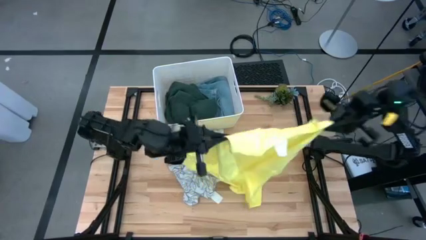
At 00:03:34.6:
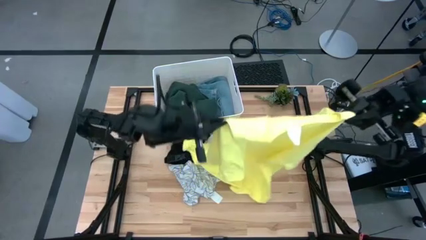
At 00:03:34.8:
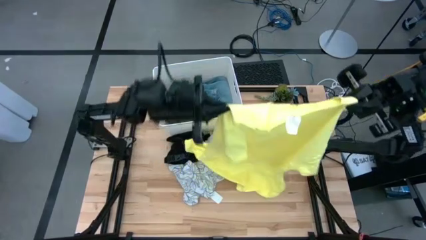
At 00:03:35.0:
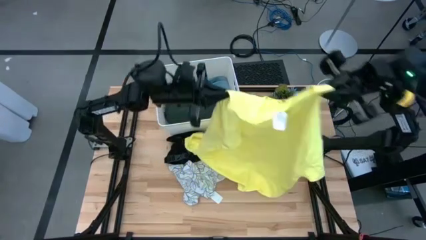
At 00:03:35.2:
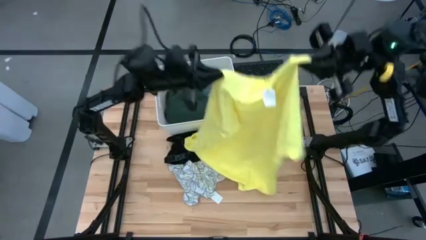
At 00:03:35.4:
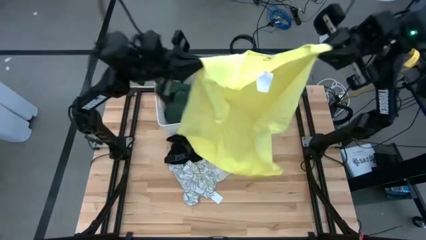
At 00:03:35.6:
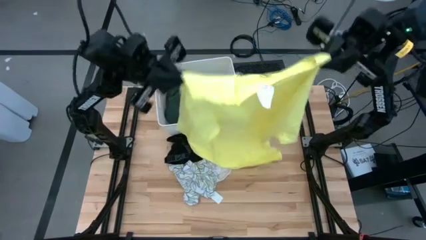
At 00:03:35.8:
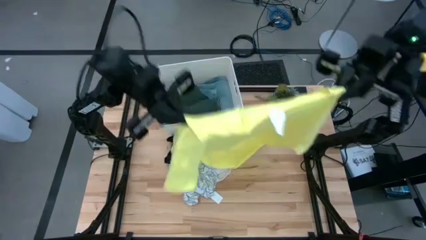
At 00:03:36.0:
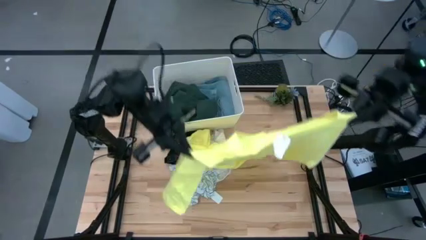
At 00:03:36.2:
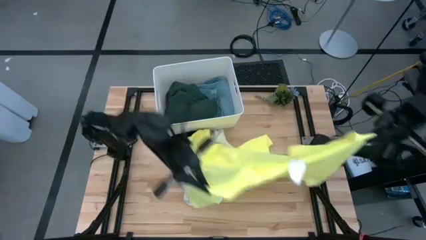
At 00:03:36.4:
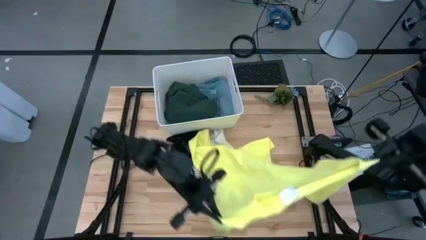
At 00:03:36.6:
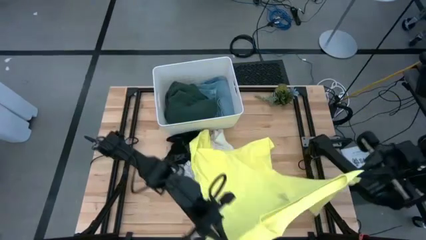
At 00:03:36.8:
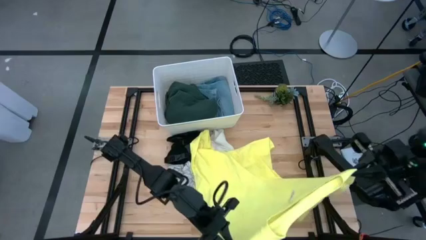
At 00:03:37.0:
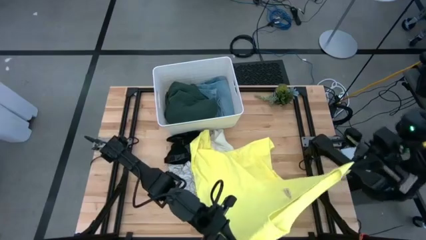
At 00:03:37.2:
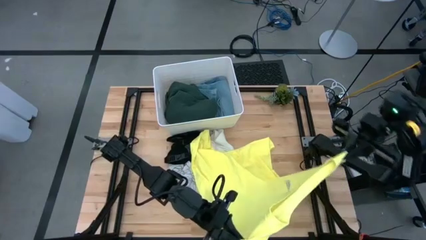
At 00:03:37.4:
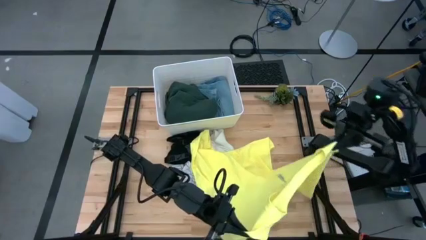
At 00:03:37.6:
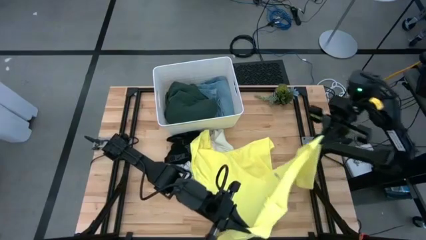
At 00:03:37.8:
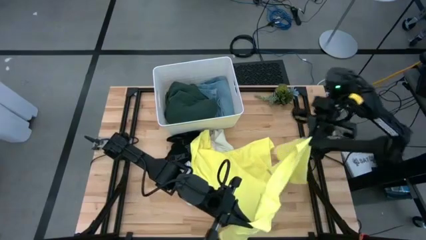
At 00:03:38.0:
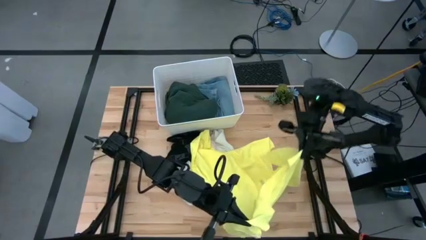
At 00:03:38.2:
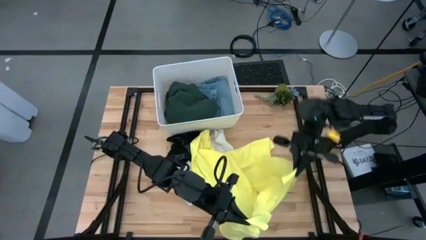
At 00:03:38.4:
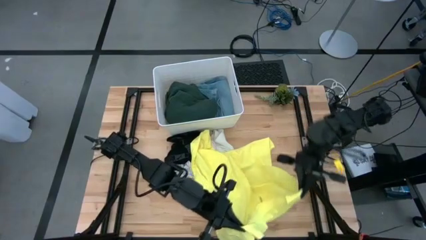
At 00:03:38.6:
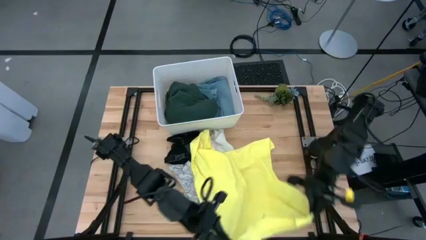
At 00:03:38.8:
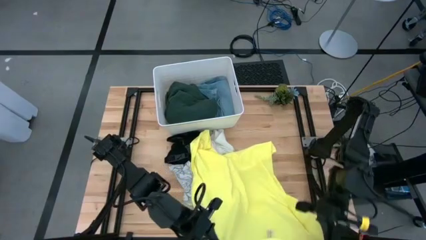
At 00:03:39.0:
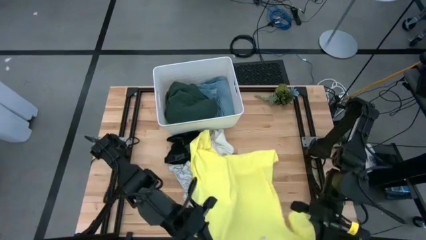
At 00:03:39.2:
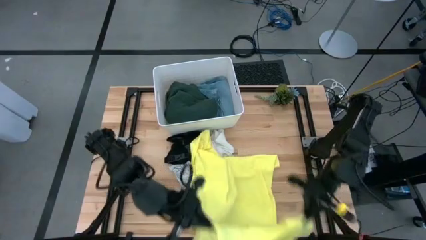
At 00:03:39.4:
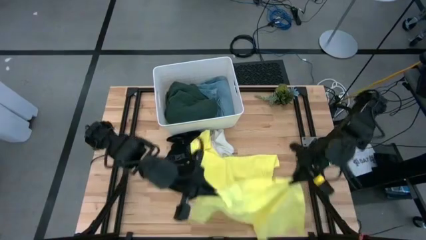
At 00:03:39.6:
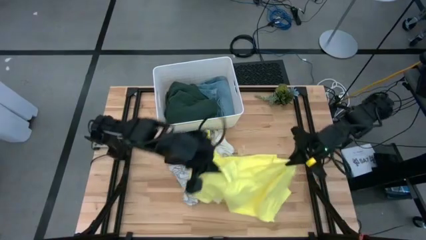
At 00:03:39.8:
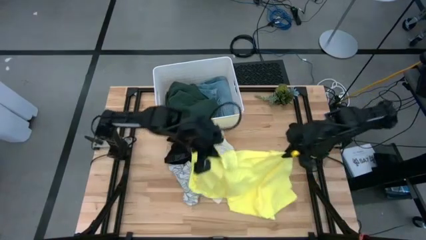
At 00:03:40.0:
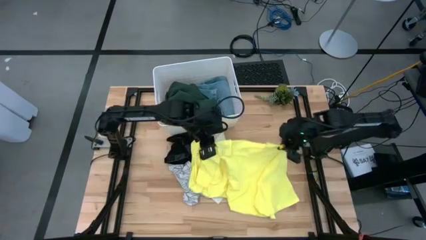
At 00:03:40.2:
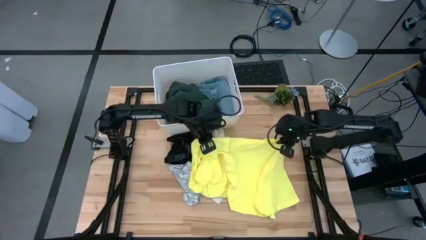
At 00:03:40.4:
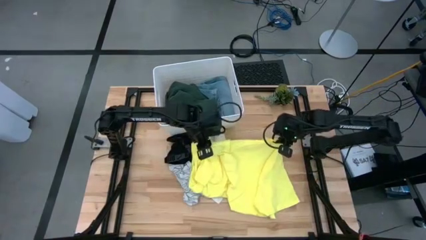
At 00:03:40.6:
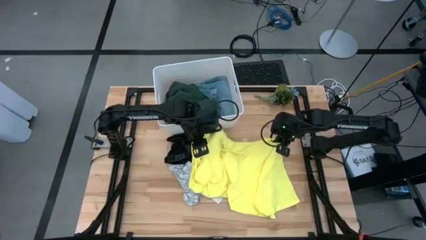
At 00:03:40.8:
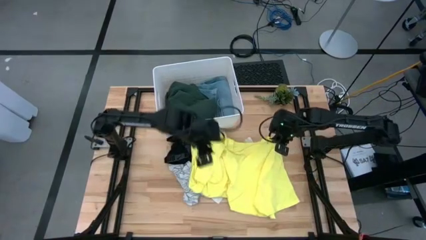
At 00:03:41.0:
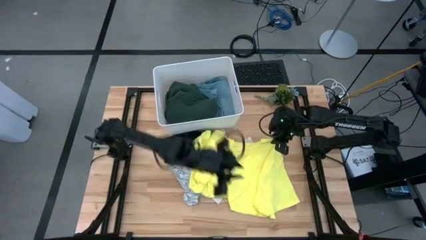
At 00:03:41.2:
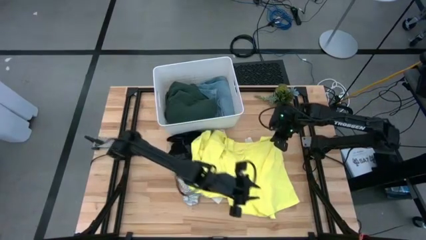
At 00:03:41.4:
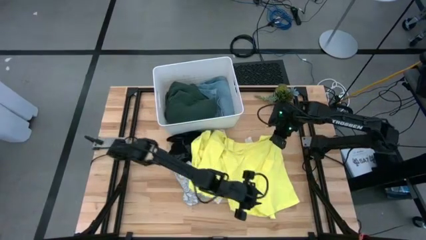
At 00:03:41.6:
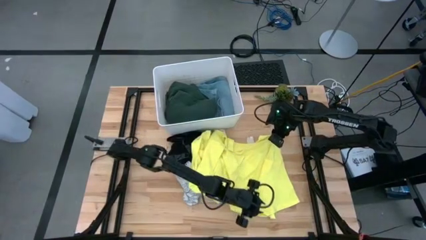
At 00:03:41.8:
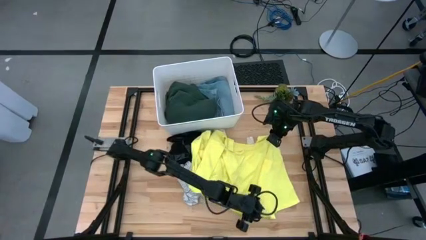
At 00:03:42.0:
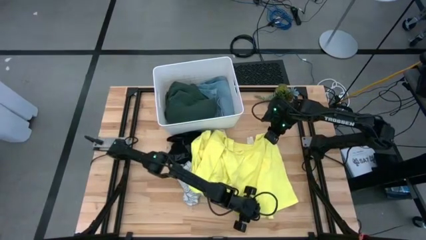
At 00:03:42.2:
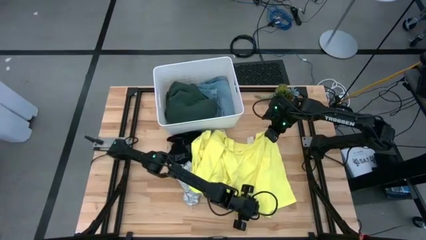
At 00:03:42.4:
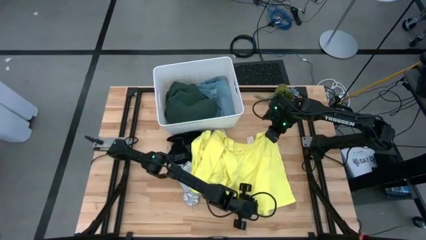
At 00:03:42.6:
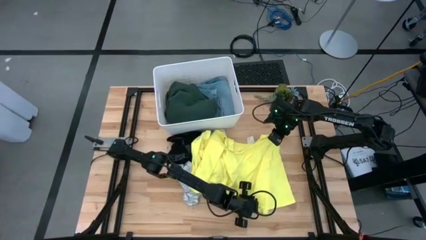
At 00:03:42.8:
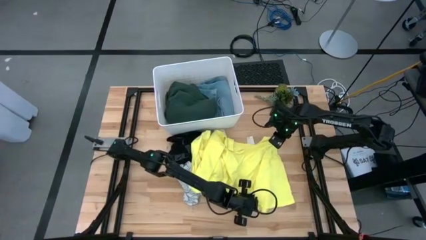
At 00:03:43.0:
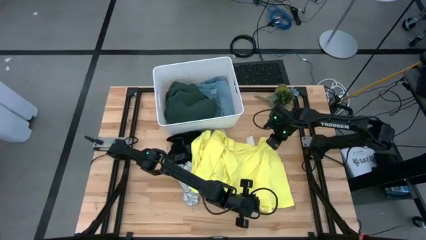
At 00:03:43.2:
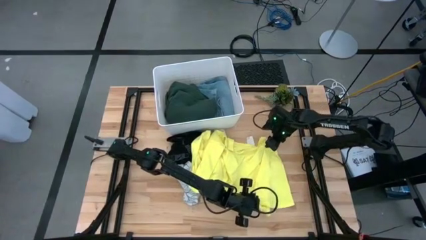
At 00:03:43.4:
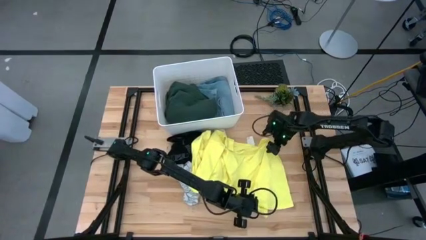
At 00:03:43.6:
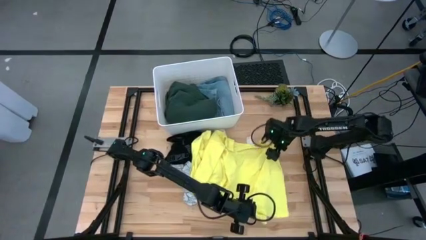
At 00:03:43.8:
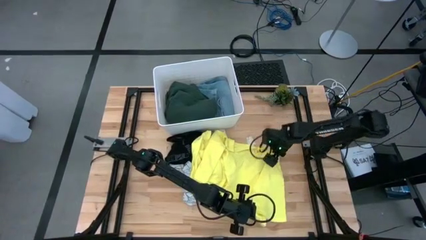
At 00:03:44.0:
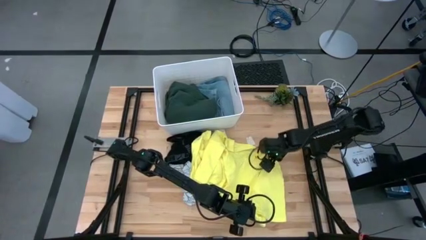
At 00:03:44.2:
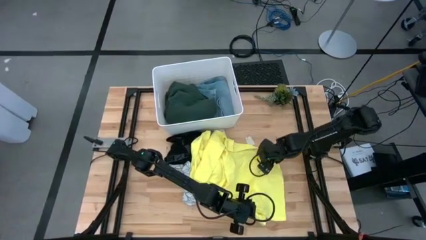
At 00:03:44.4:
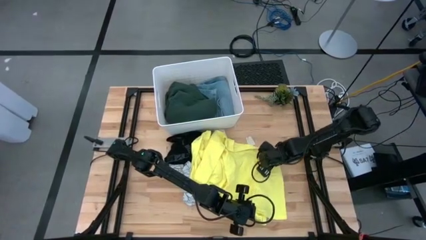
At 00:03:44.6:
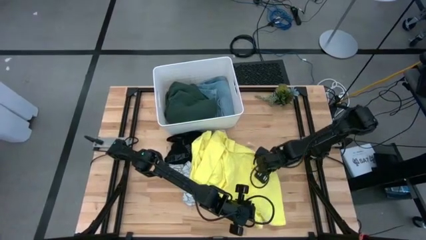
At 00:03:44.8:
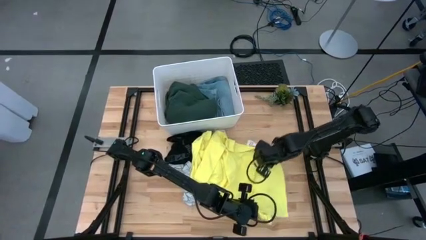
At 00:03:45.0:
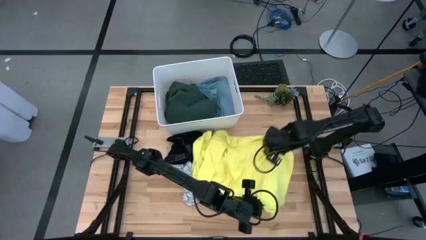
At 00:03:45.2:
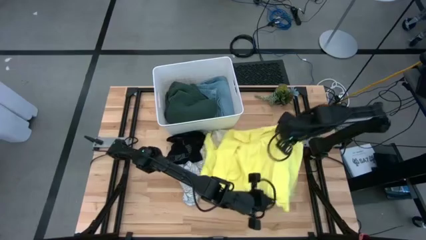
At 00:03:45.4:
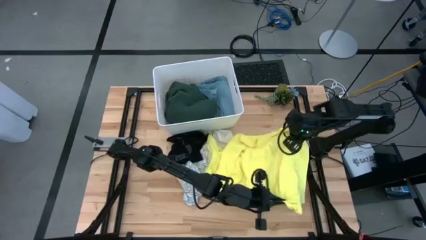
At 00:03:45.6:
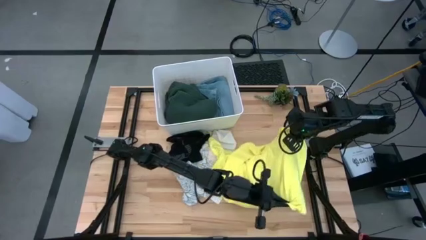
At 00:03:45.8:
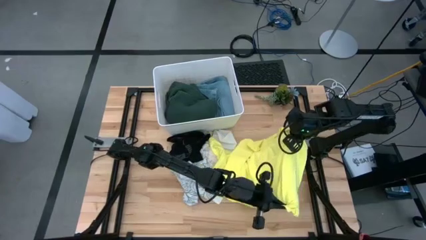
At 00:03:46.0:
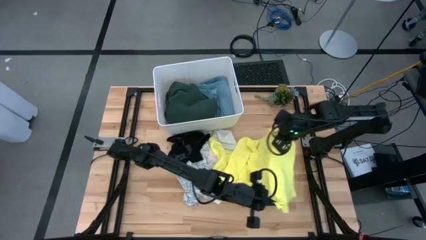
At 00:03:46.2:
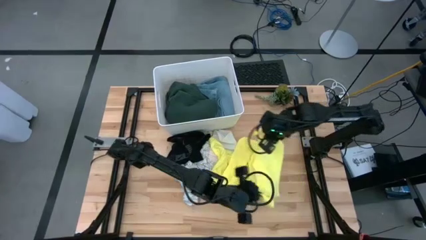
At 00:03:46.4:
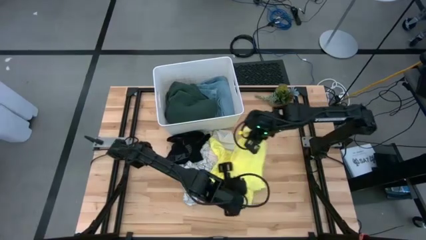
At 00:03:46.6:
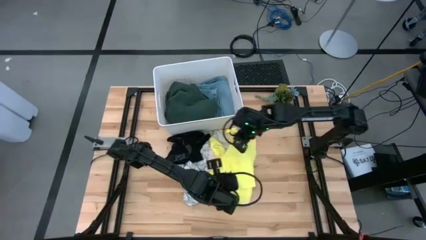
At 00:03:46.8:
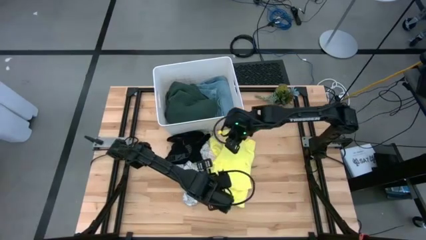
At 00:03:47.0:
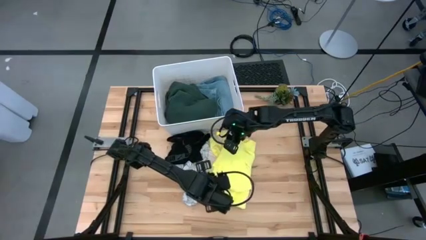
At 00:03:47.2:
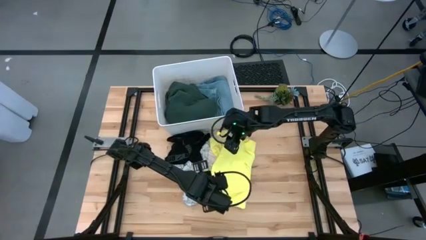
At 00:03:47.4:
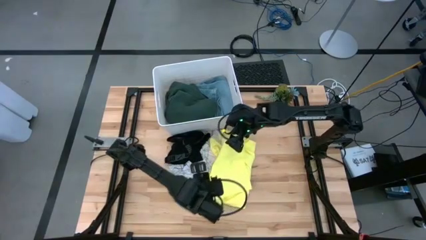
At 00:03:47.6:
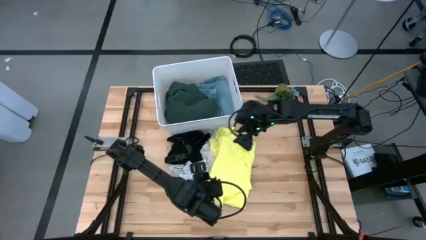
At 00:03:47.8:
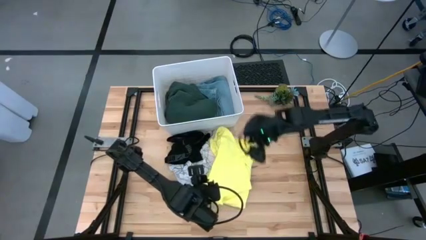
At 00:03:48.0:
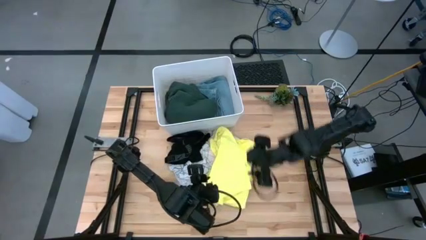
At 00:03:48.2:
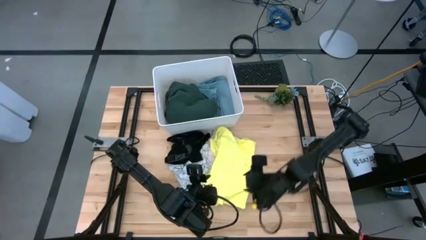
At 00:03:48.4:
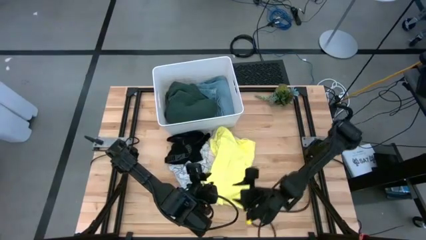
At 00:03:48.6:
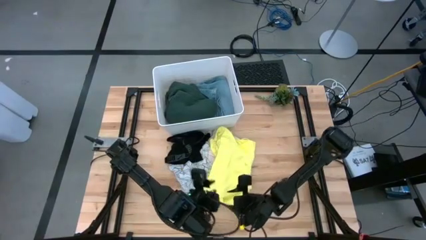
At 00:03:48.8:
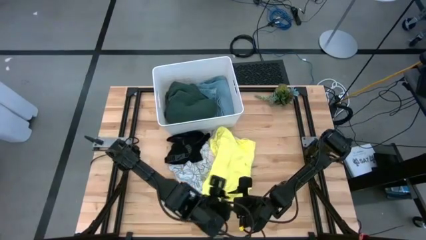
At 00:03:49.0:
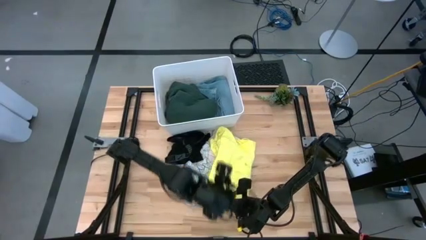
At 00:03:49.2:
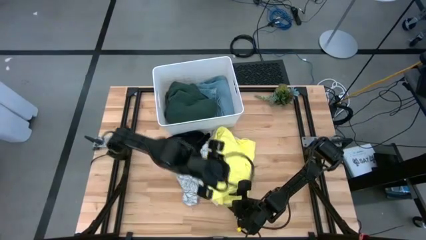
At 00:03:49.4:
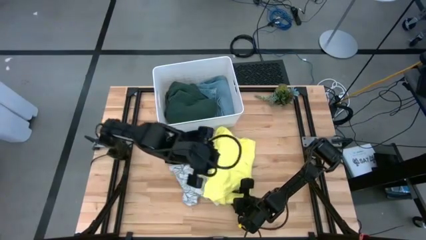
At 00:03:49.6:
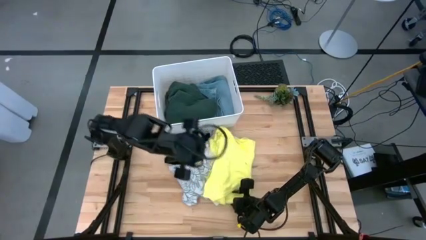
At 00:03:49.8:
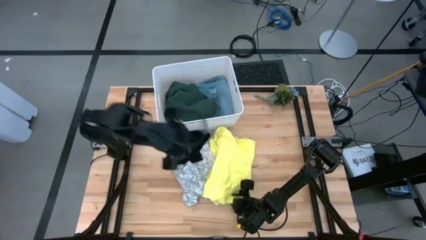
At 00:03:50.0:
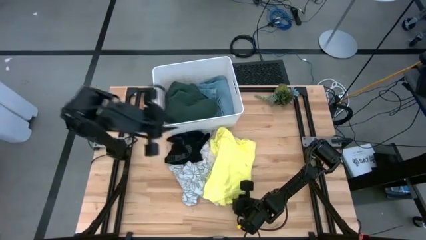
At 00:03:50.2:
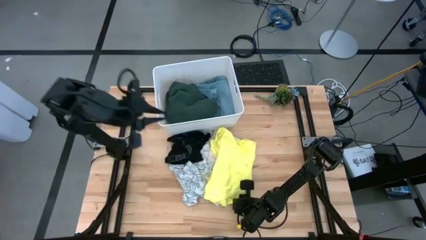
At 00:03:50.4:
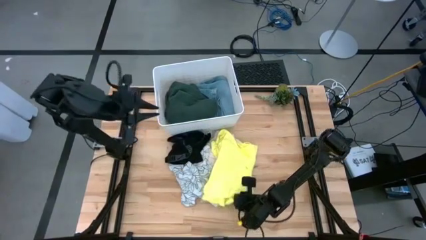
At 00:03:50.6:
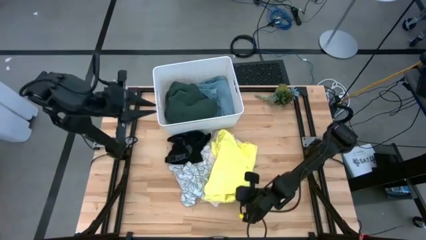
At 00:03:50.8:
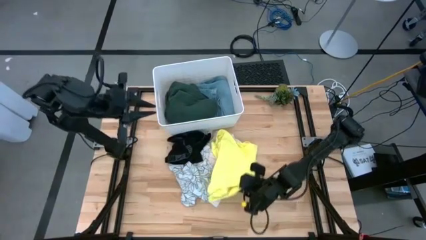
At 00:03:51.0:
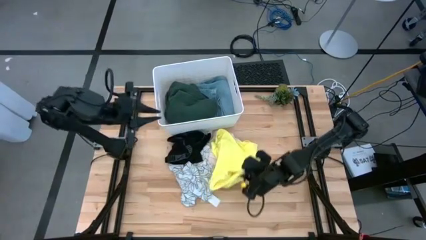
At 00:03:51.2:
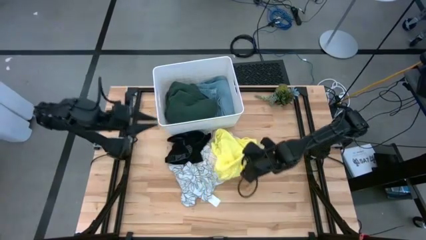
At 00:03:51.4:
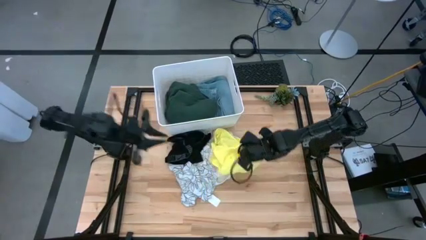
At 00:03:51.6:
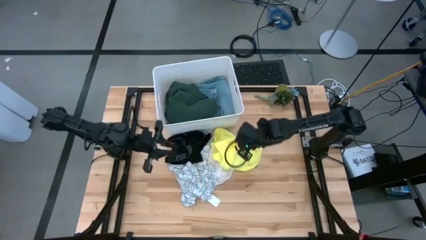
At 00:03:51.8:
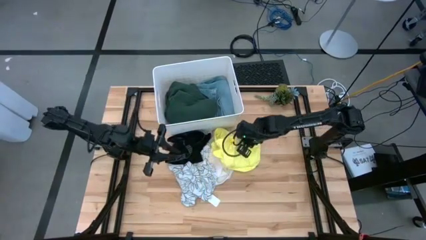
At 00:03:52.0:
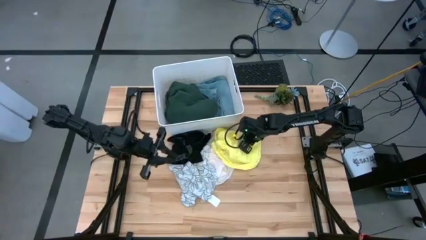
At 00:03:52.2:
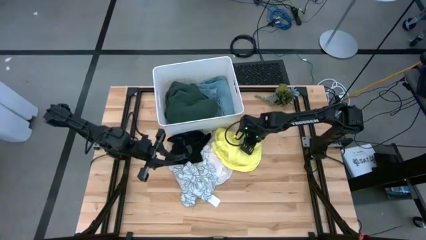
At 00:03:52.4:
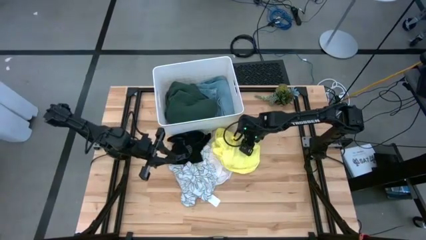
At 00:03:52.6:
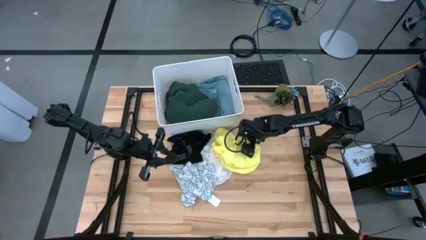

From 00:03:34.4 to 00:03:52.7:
Task: Fold laundry
Fold the yellow shirt
